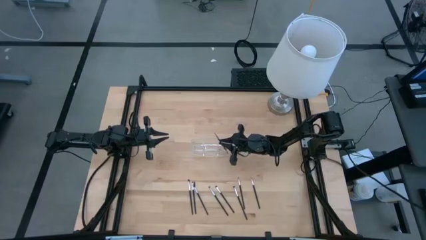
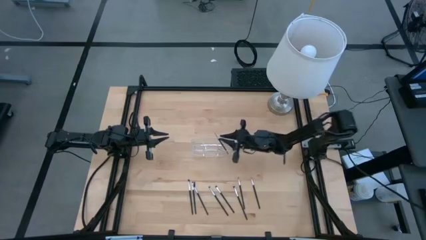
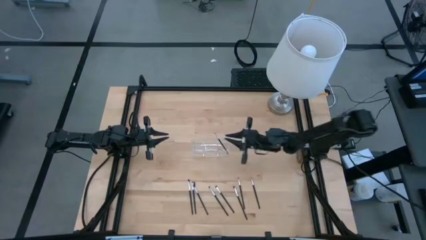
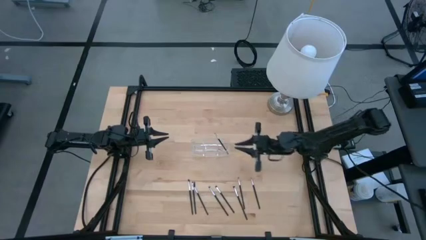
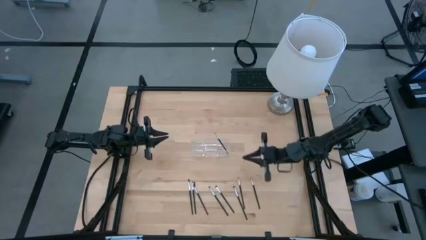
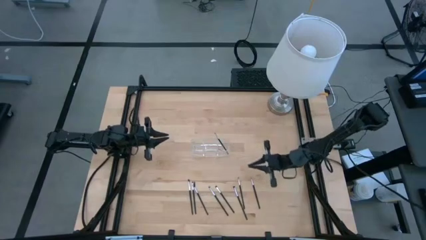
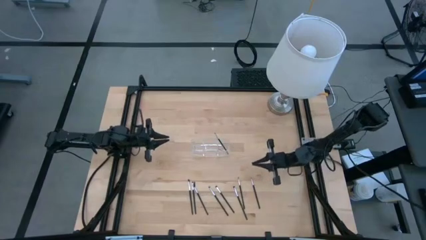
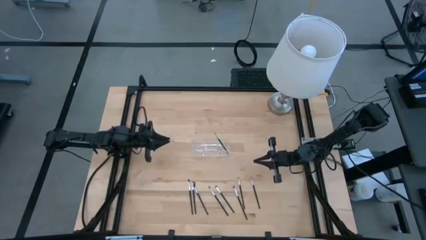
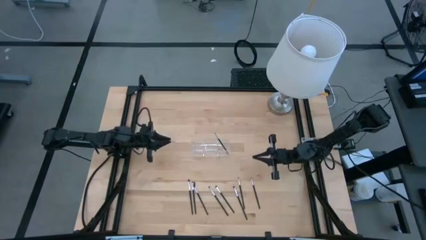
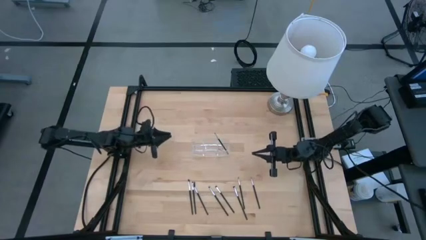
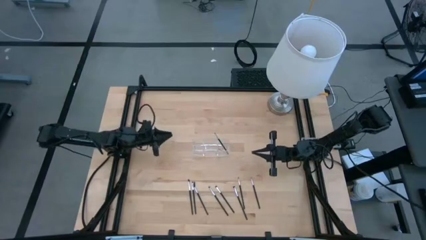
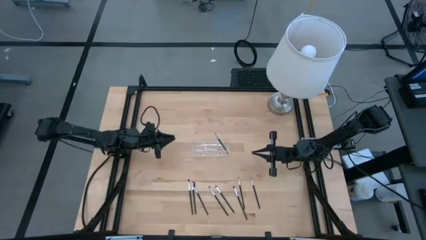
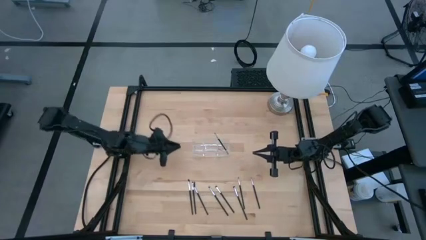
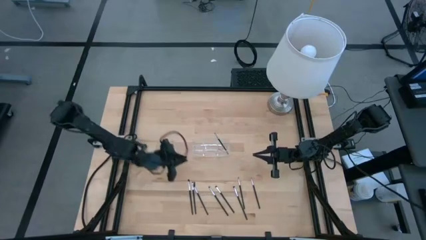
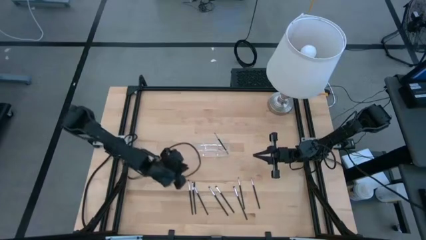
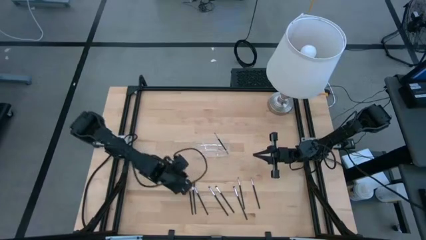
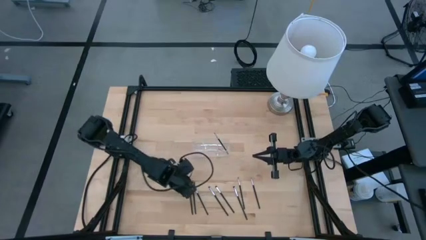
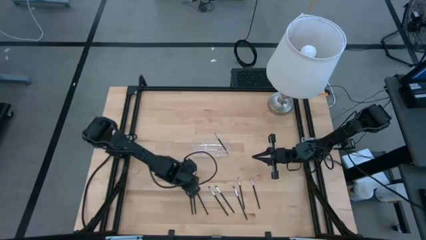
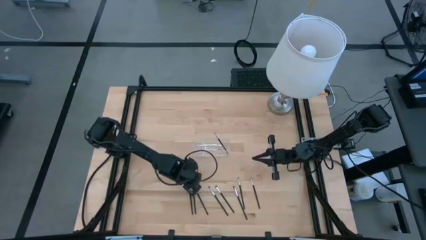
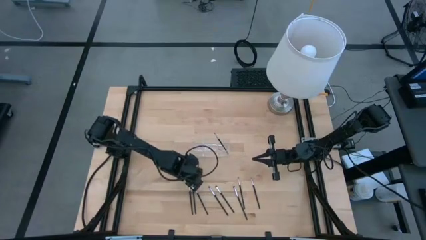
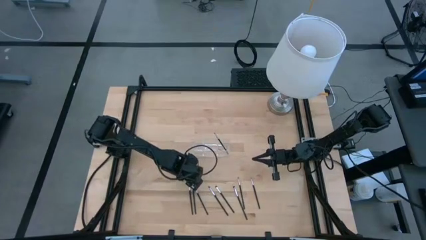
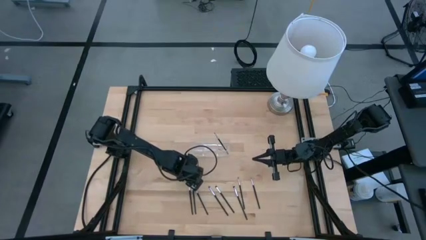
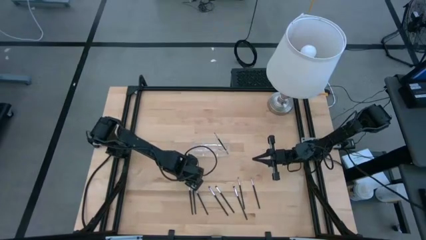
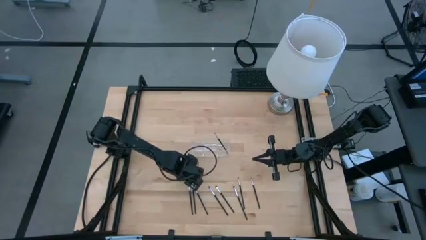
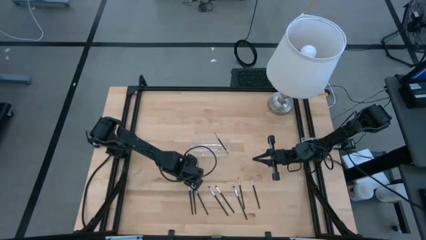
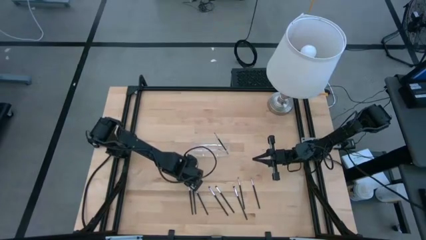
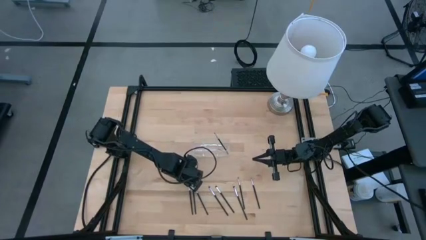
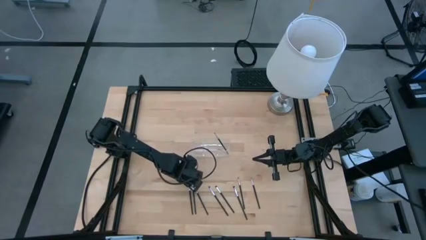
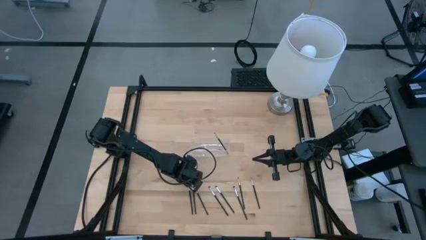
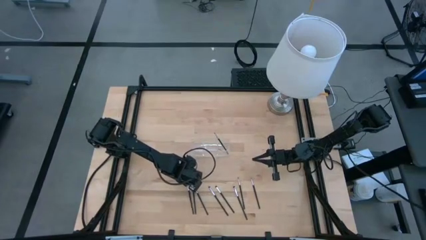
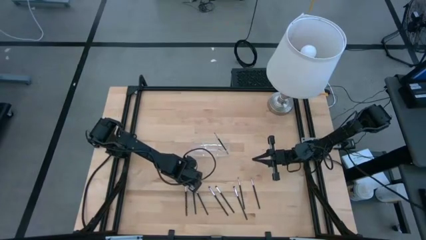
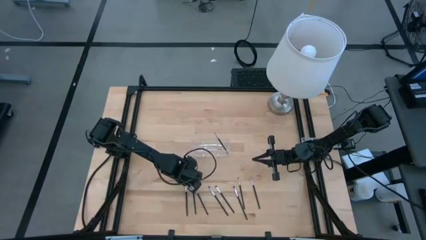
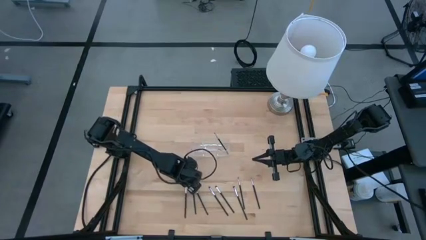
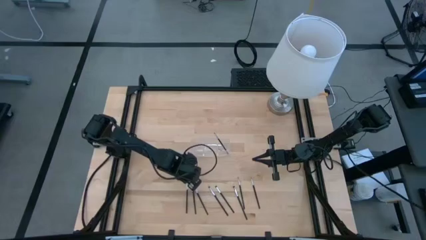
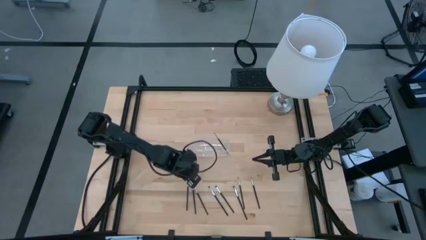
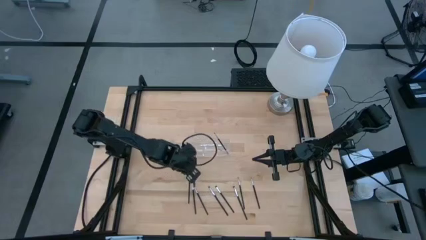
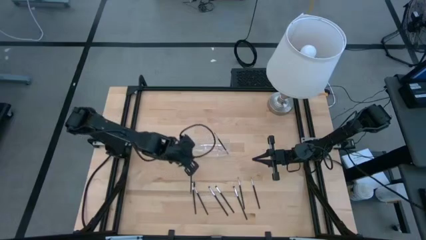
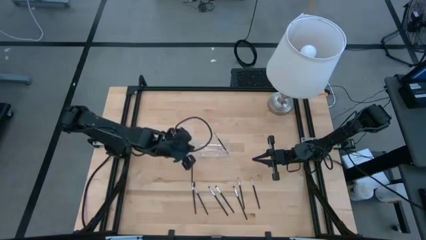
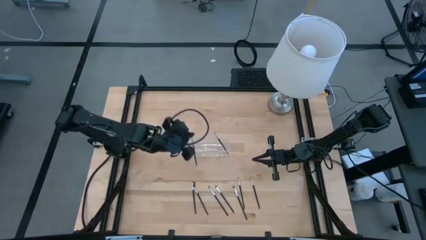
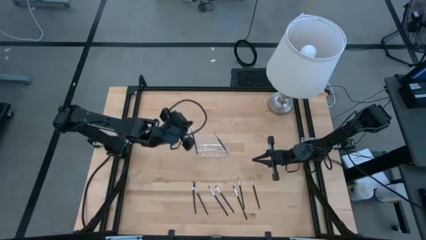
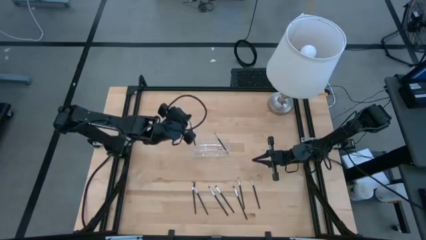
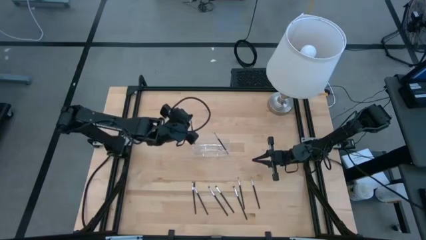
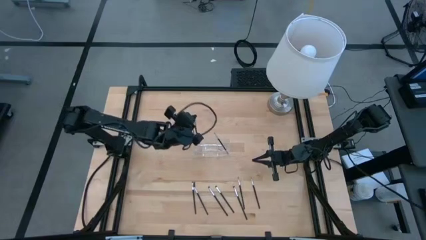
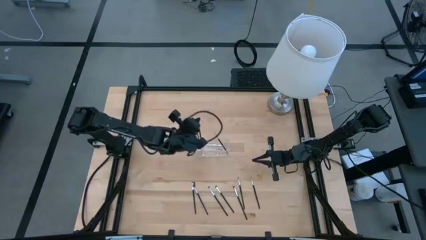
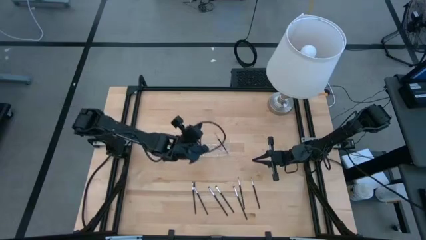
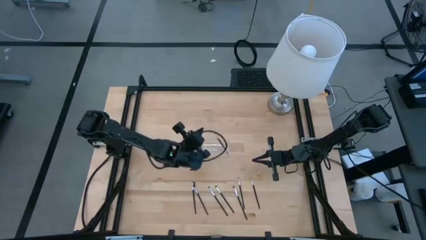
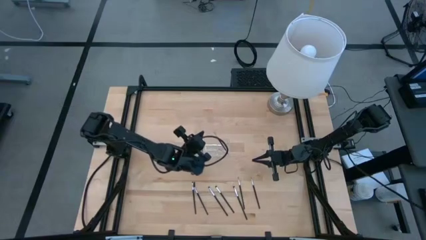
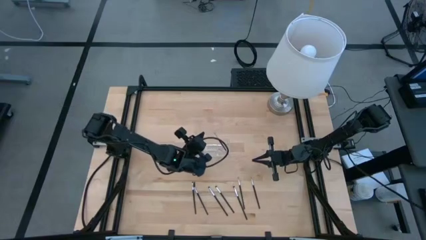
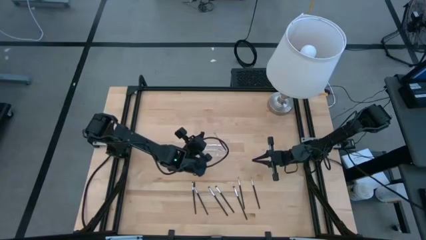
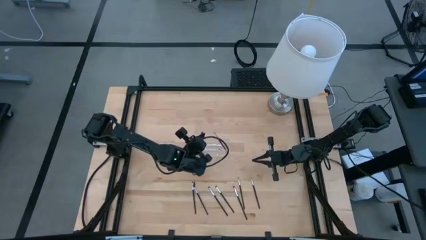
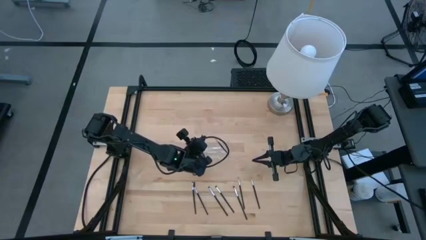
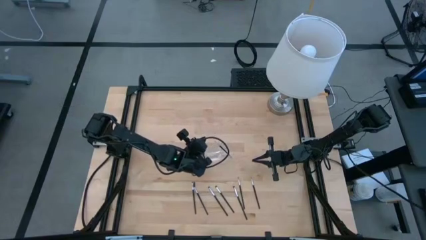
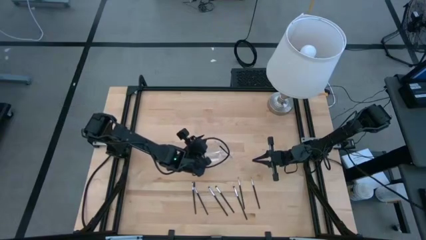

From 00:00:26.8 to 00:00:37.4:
Task: Put items in baskets/containers
Put the eyeshadow brush in the transparent organizer

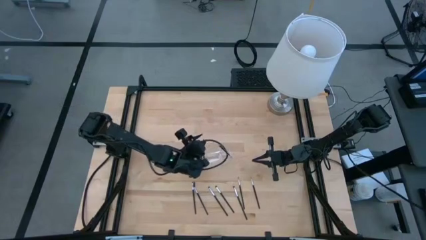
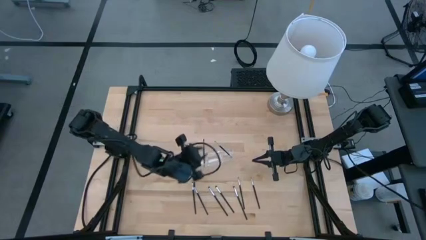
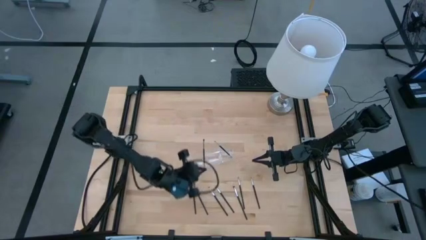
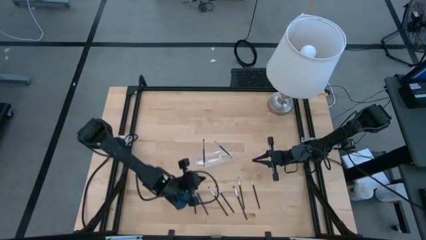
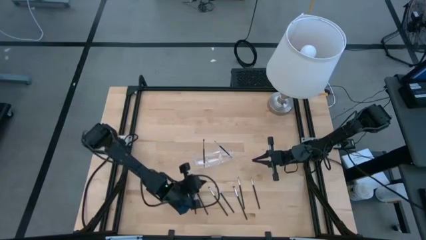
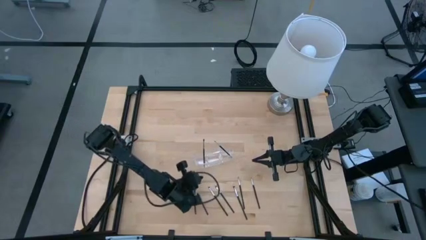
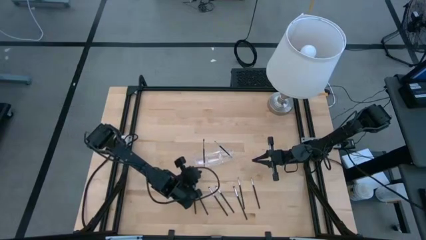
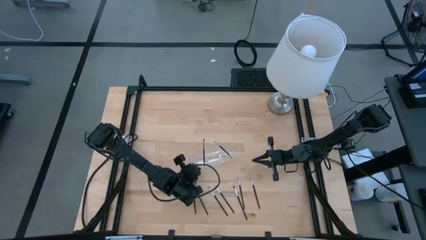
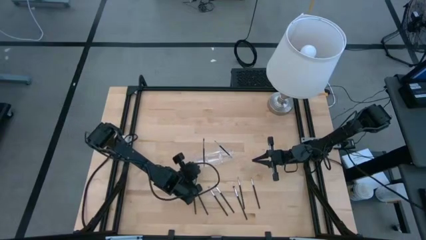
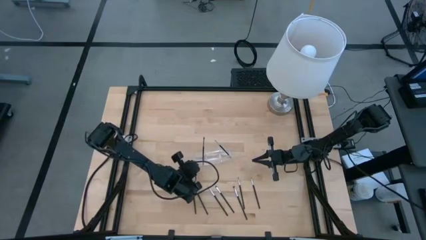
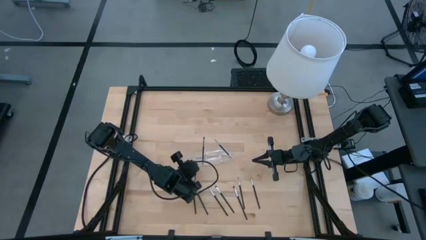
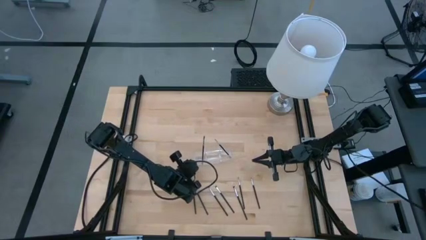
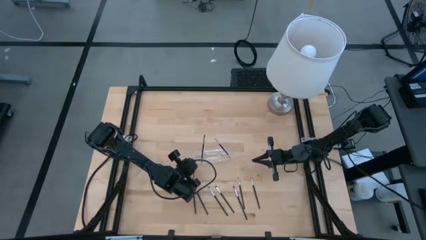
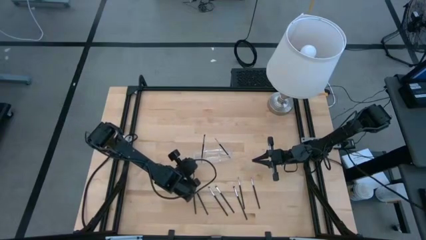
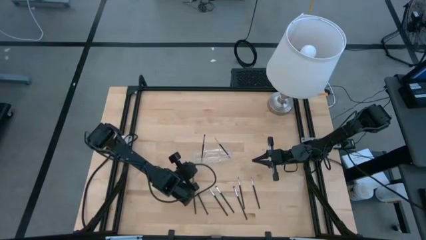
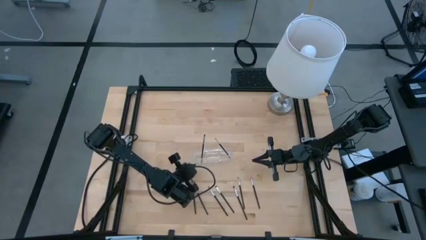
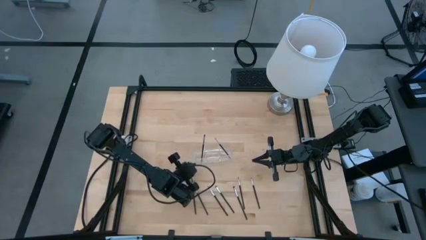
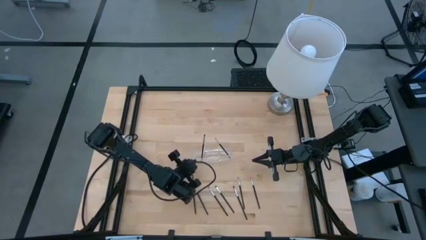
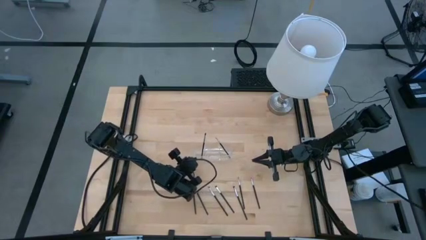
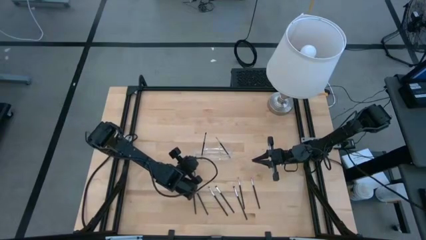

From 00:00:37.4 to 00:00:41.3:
Adjust the transparent organizer

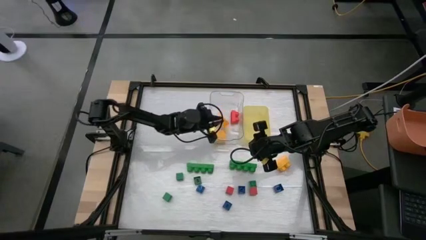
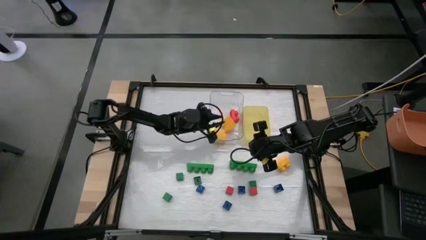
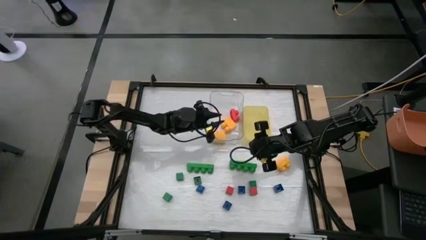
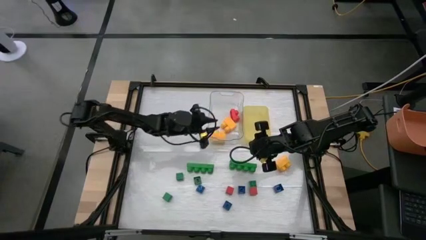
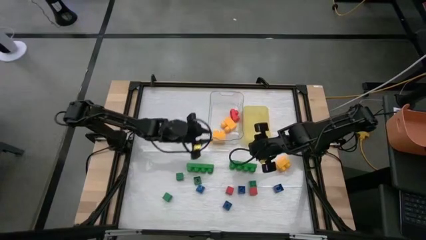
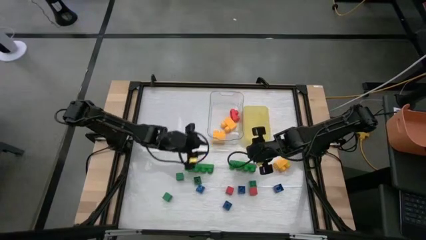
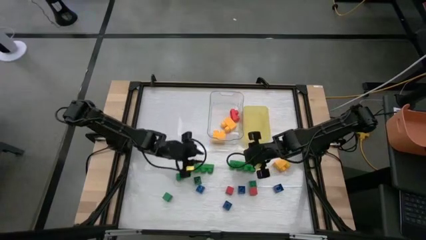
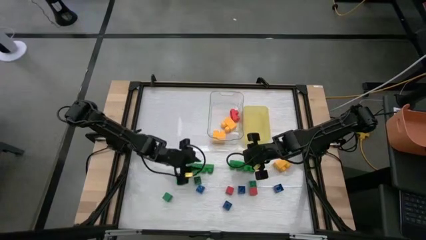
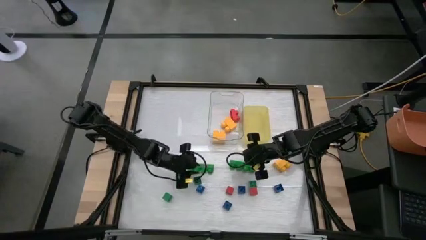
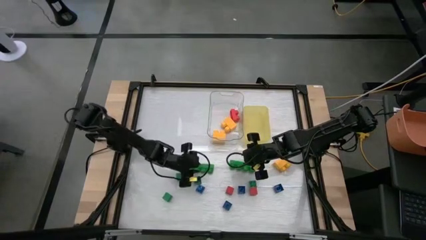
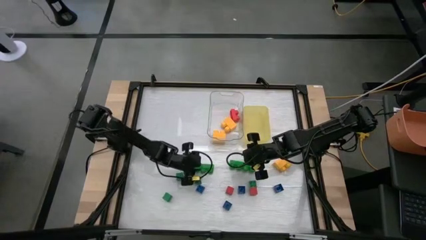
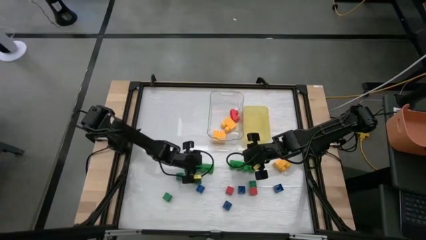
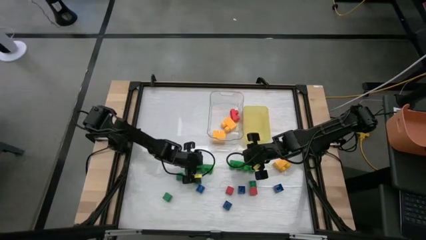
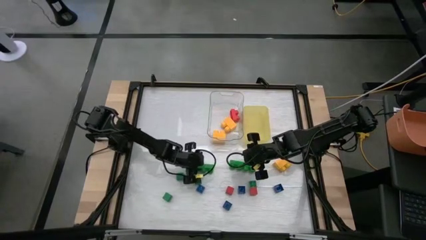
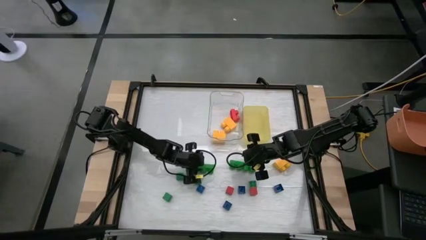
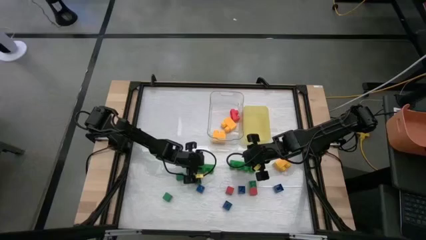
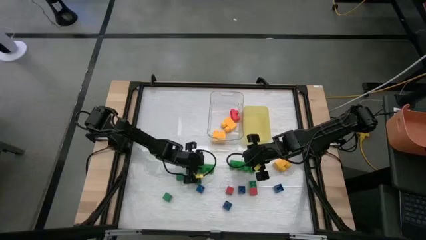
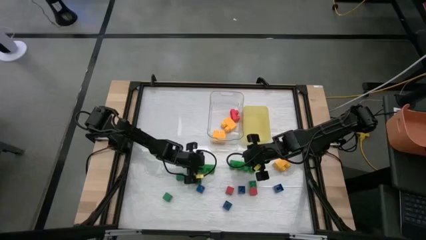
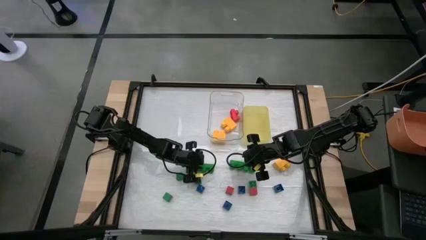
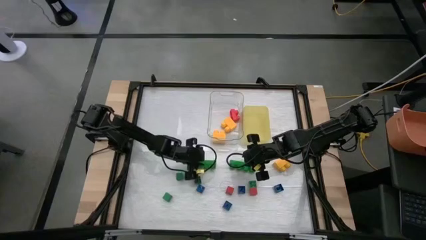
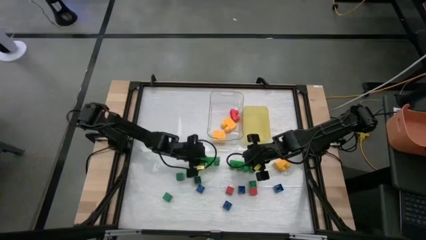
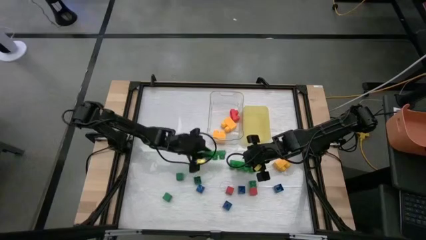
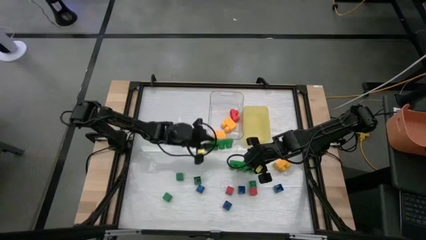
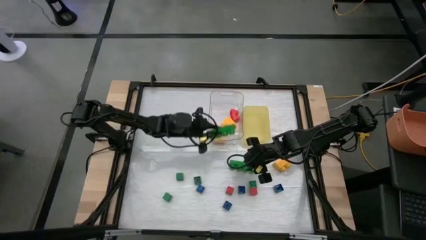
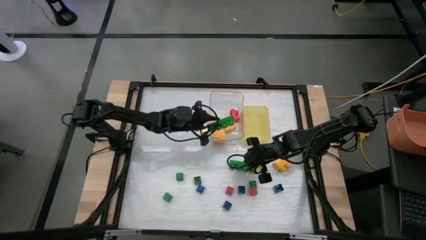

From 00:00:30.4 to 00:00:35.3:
Task: Sort blocks by size
Put the large green game piece into the transparent bin
